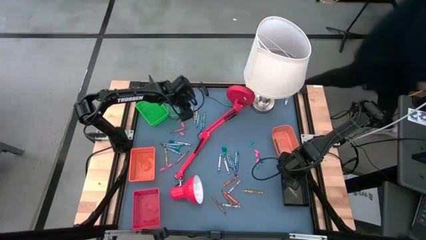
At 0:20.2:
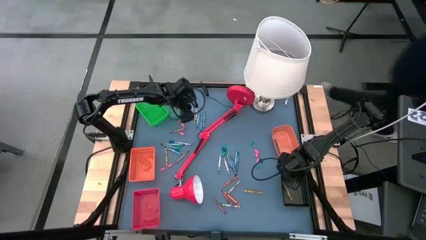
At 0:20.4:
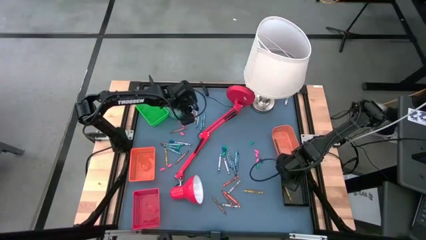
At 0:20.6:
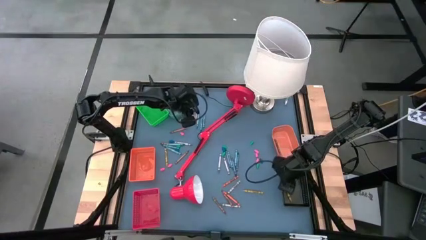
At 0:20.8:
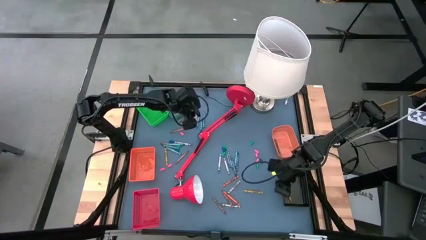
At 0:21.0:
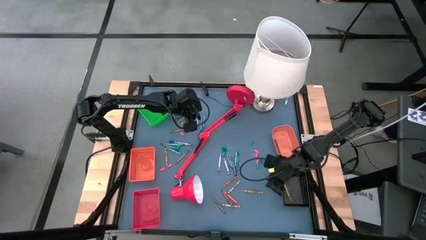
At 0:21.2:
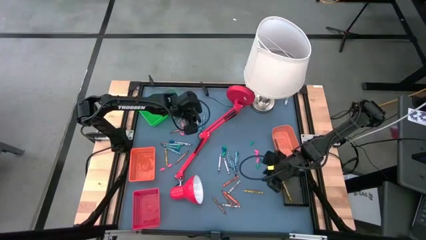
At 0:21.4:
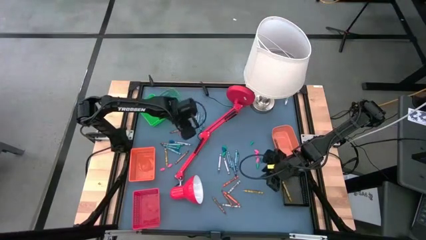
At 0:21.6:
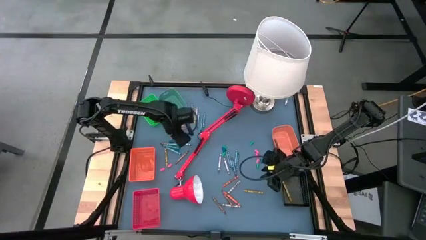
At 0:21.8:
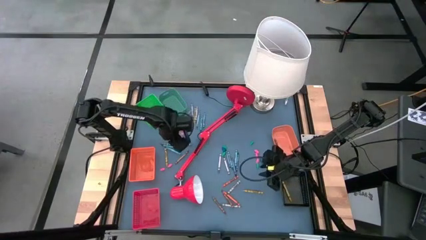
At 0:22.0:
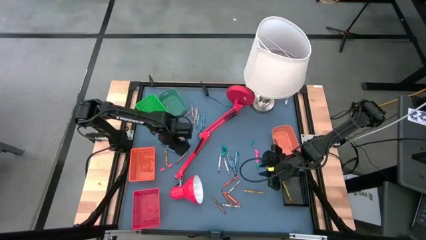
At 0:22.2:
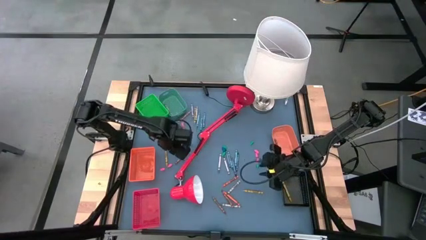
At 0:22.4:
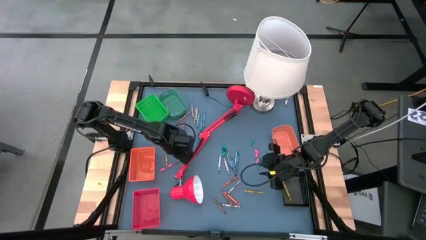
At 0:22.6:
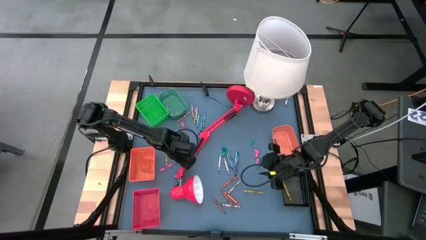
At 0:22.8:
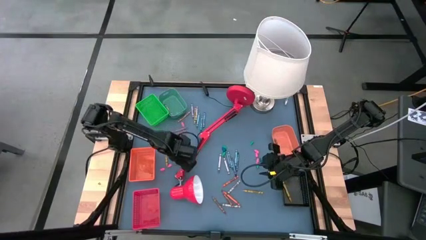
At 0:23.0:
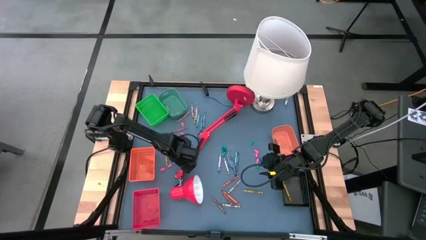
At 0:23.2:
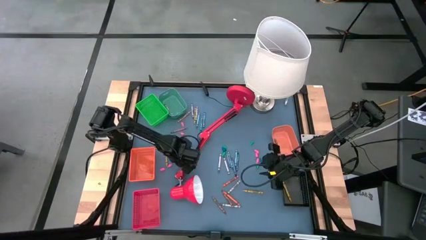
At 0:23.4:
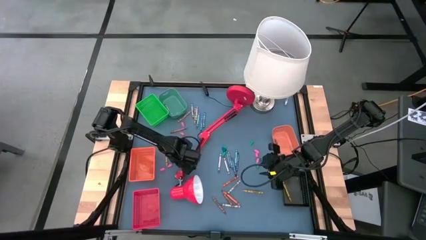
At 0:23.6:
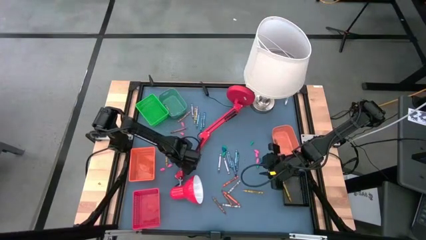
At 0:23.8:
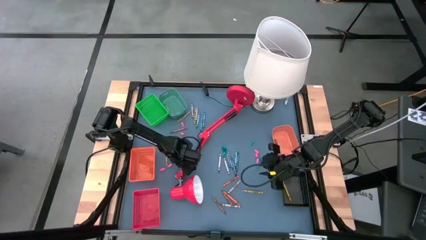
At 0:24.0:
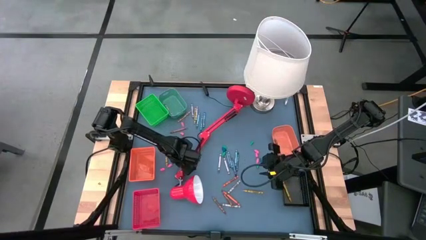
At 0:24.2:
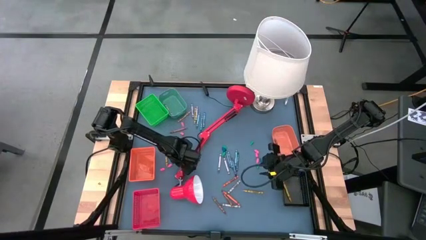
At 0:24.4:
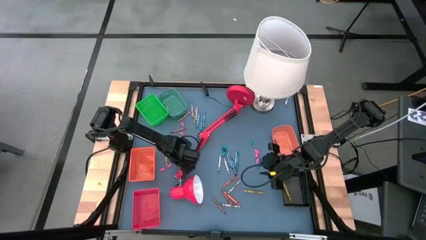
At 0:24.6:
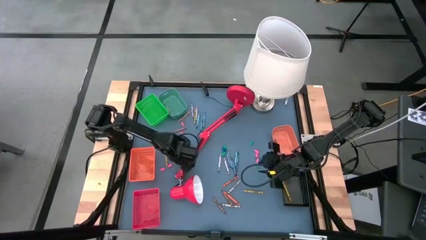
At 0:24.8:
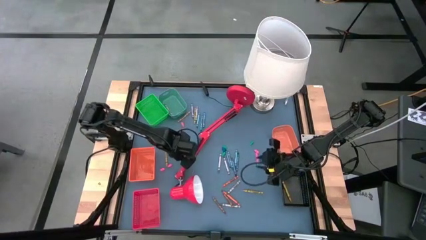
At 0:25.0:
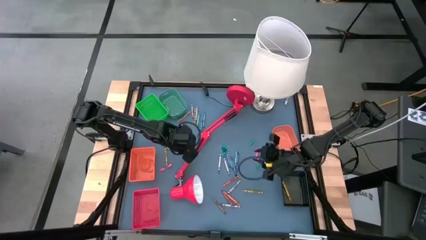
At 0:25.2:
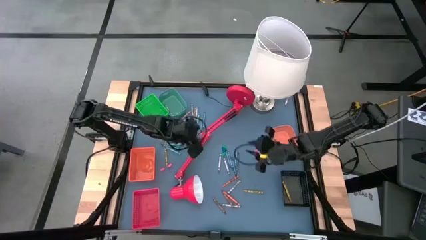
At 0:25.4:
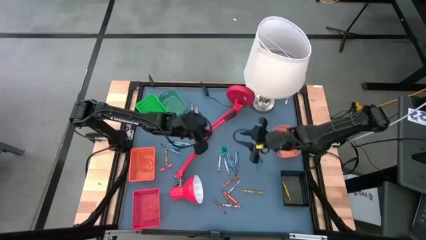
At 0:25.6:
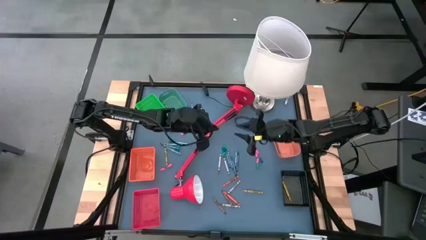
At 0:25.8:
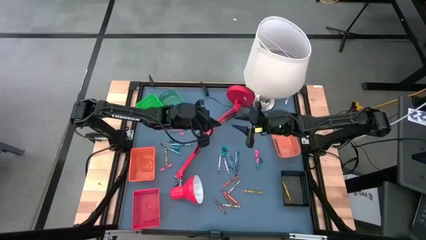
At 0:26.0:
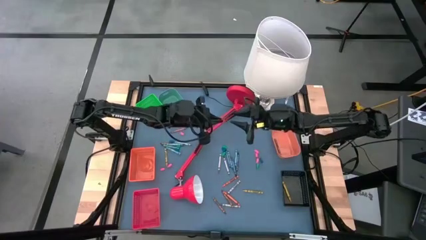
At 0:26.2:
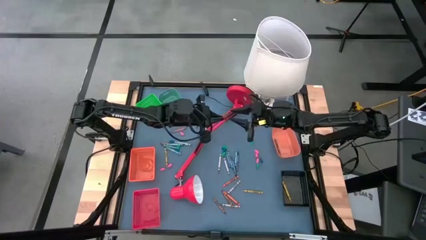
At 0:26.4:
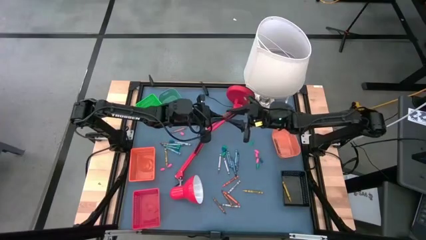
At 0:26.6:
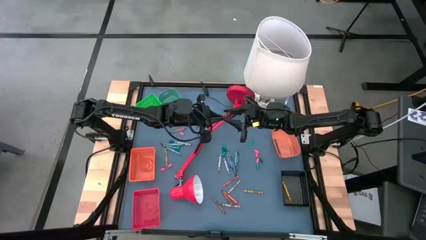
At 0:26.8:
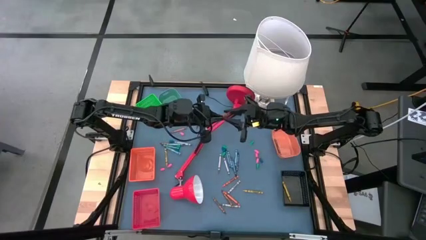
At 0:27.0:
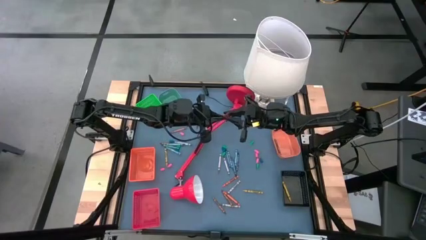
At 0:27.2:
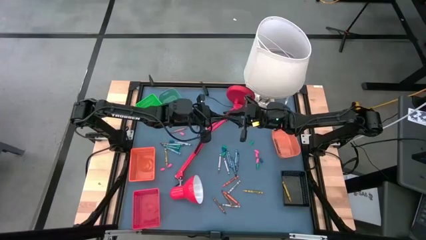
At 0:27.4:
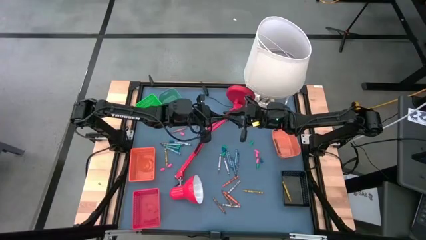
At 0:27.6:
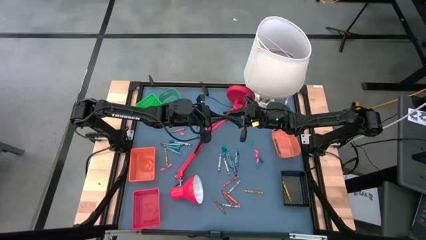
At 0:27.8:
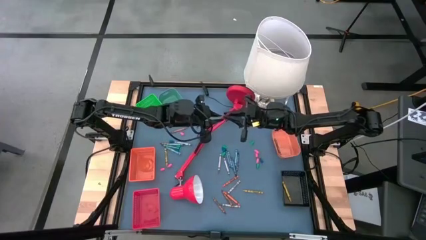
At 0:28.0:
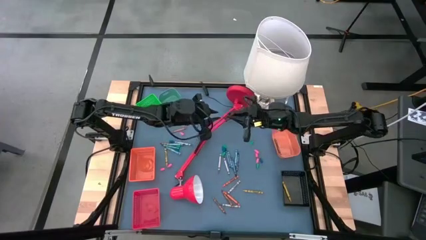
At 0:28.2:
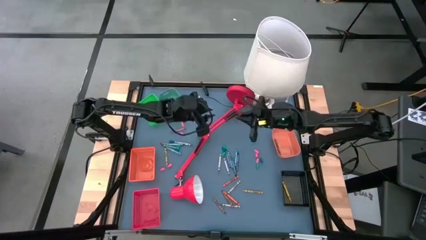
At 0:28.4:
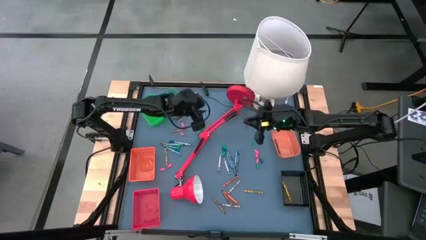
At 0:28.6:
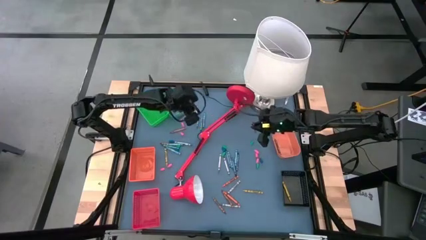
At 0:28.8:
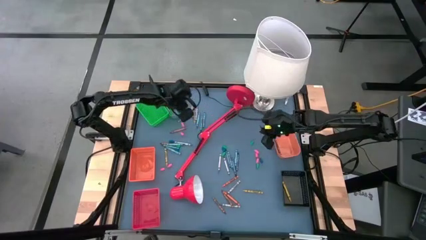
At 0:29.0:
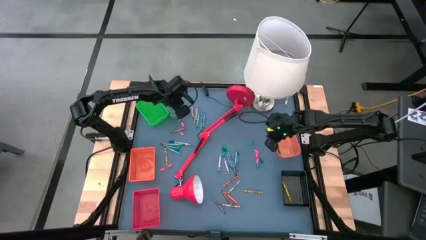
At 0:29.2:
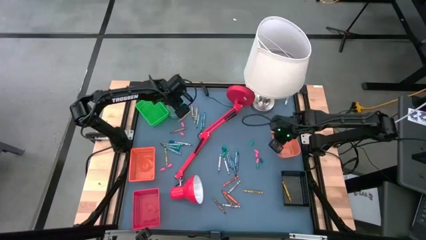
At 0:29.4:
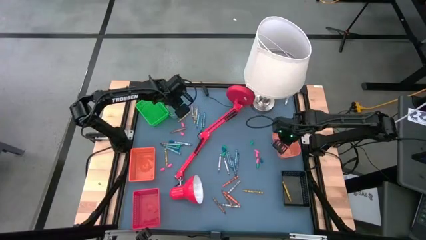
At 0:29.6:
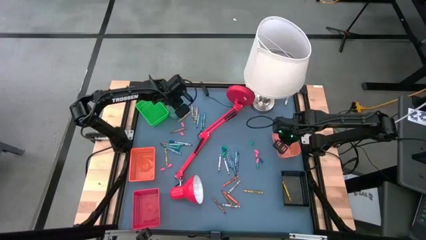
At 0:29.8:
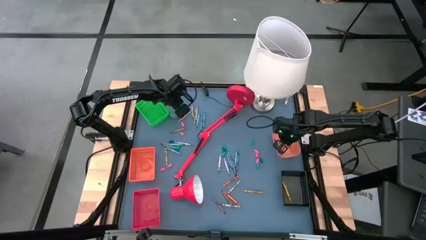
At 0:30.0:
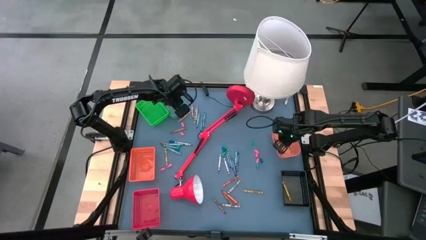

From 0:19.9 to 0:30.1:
Task: Sort crayons
Put the brown crayon into the right orange bin

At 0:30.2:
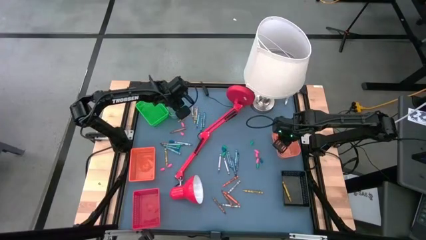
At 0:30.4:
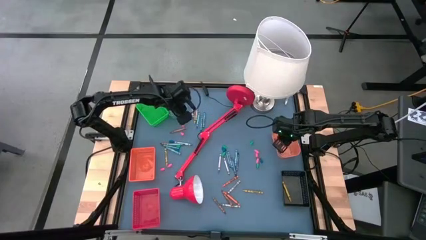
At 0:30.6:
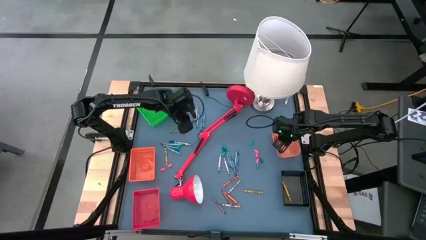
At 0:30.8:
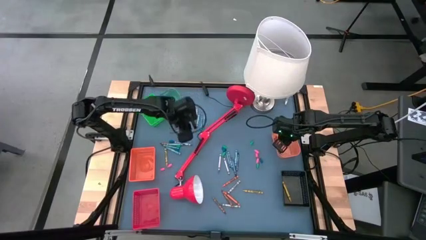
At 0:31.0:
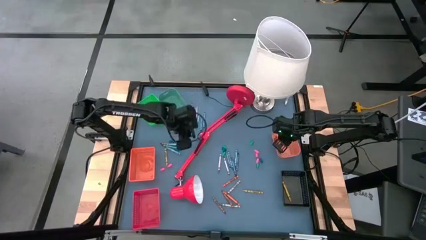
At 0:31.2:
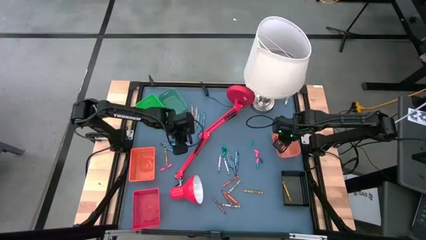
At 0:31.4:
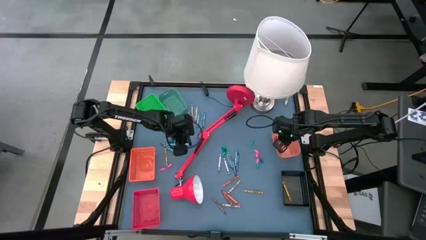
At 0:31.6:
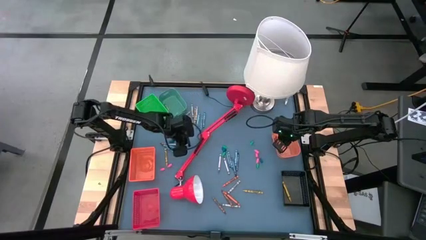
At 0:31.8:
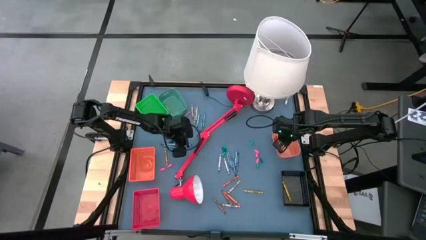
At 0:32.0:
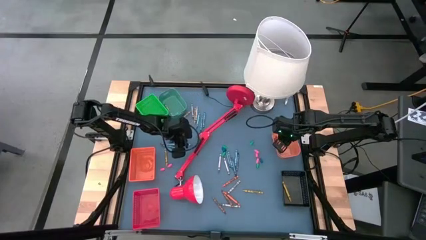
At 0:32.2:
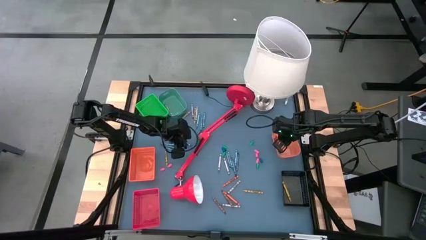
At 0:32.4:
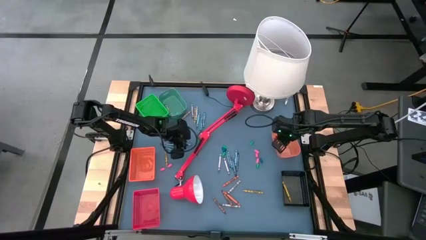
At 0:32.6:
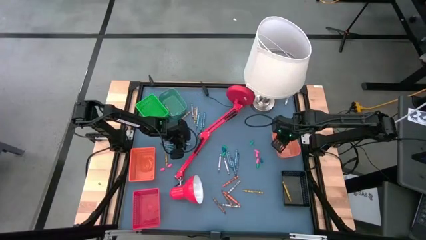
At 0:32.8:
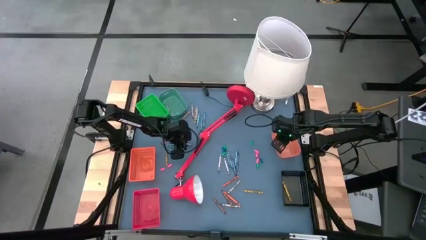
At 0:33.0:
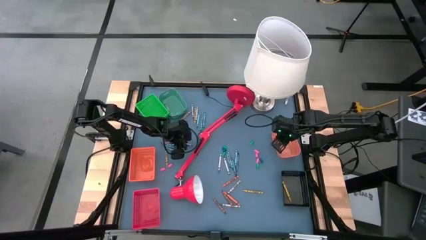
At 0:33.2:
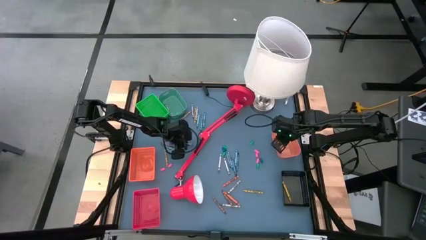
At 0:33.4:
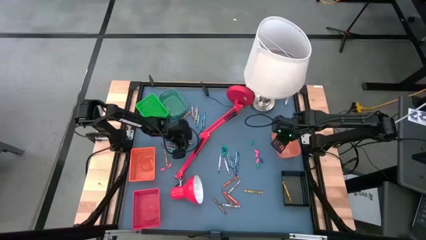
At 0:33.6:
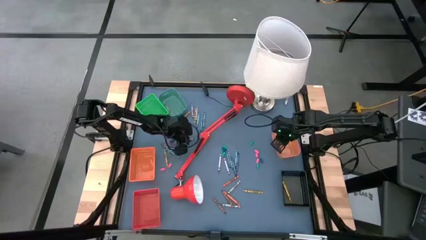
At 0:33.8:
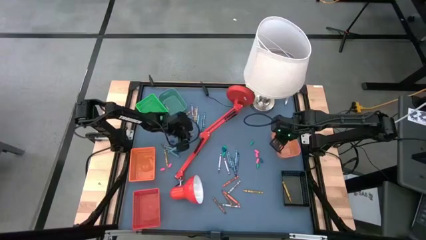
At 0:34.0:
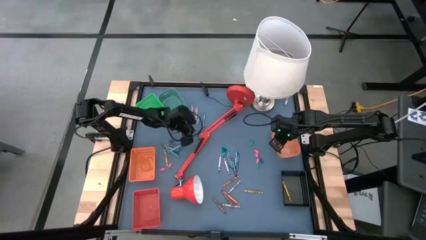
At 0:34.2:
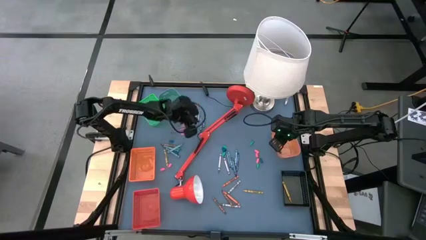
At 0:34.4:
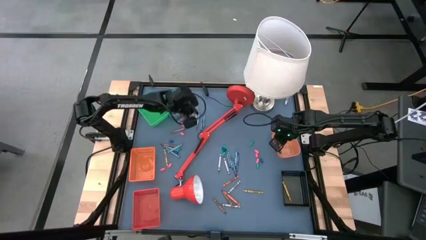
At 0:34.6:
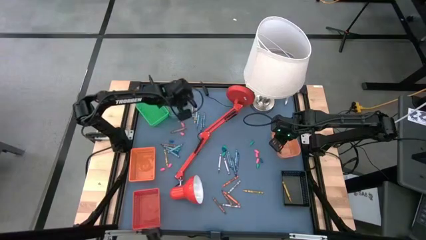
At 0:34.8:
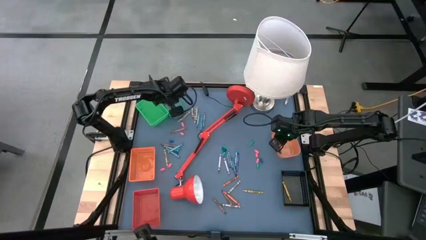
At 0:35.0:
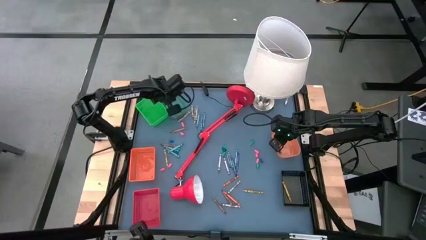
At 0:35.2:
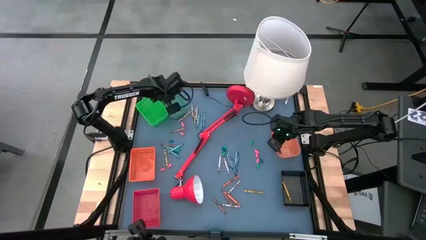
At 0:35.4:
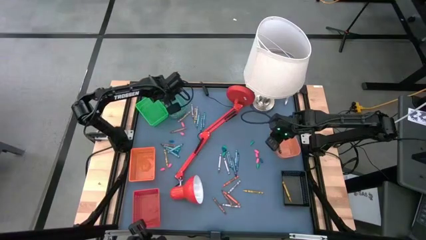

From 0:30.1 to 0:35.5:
Put the gray crayon into the blue bin
